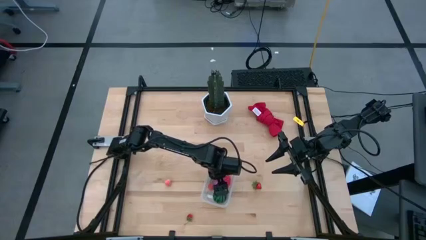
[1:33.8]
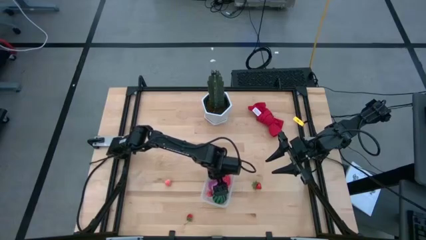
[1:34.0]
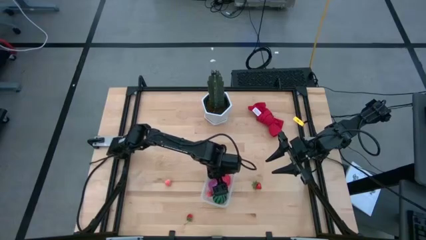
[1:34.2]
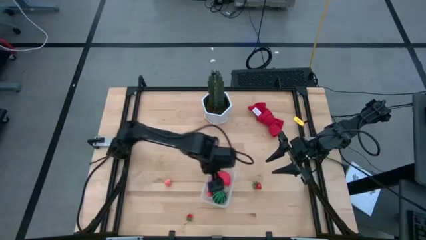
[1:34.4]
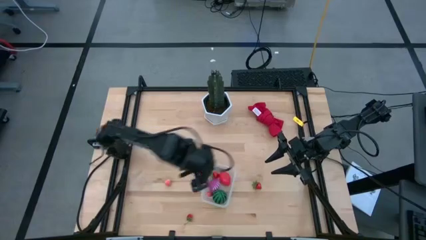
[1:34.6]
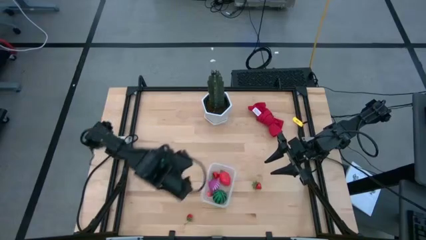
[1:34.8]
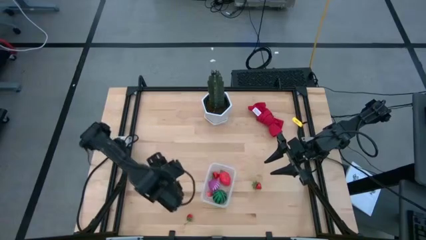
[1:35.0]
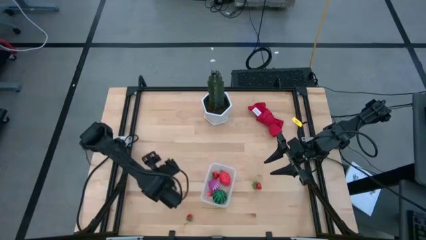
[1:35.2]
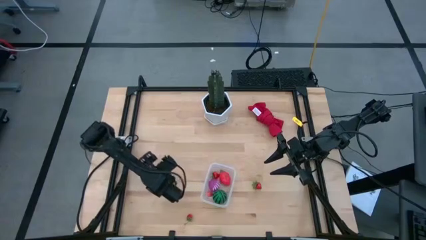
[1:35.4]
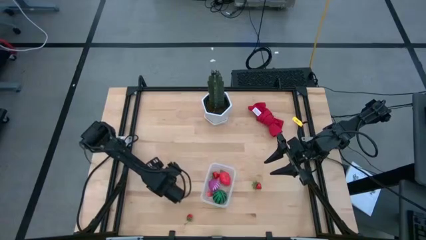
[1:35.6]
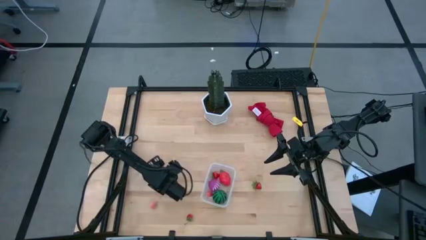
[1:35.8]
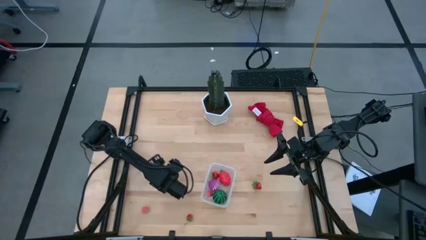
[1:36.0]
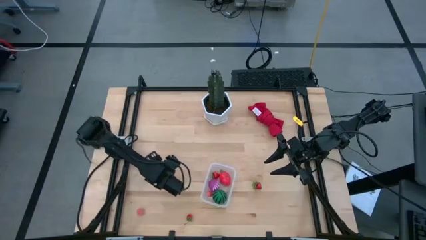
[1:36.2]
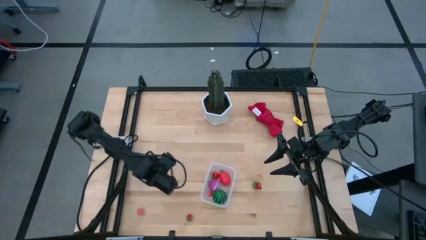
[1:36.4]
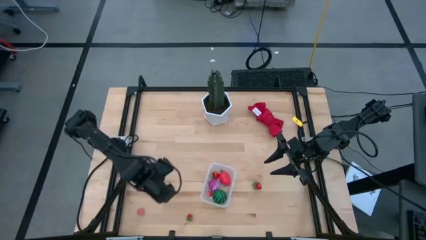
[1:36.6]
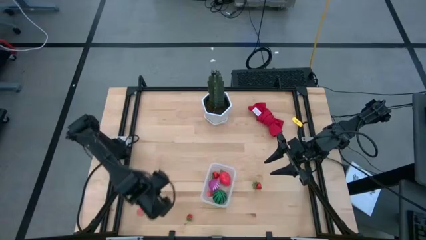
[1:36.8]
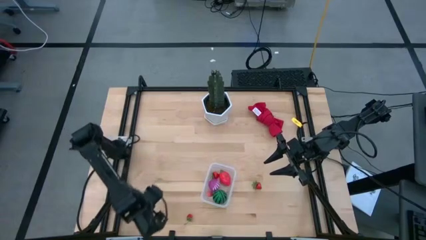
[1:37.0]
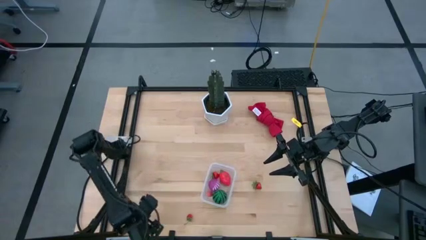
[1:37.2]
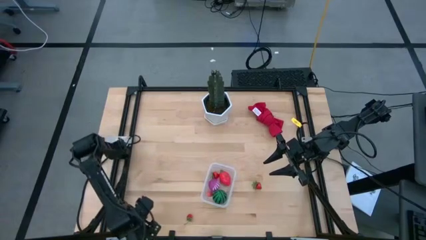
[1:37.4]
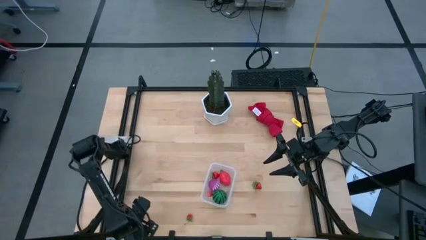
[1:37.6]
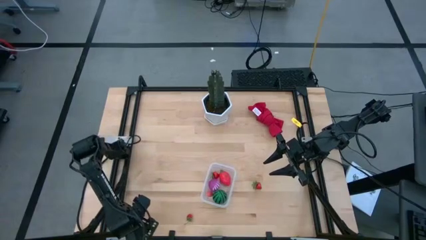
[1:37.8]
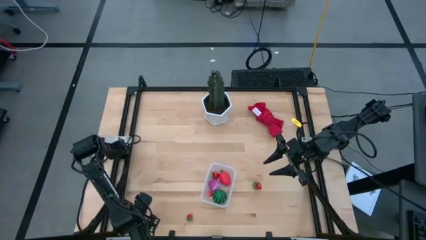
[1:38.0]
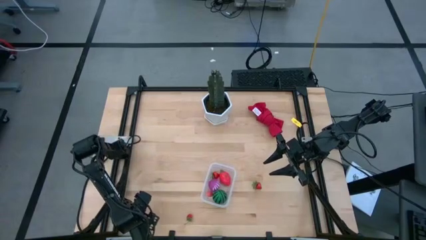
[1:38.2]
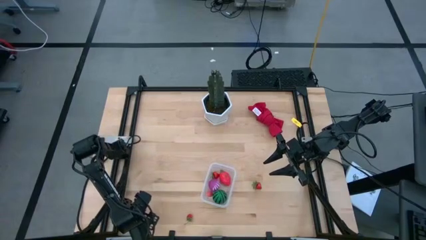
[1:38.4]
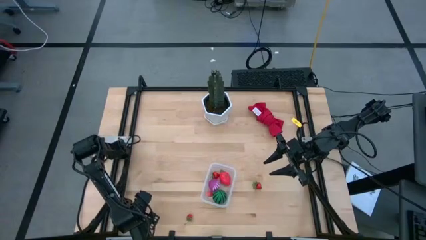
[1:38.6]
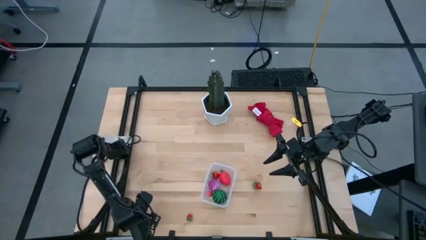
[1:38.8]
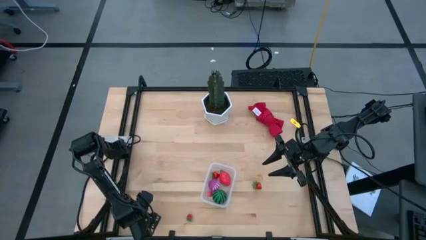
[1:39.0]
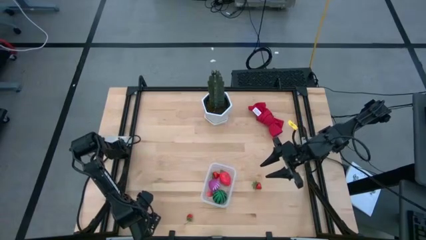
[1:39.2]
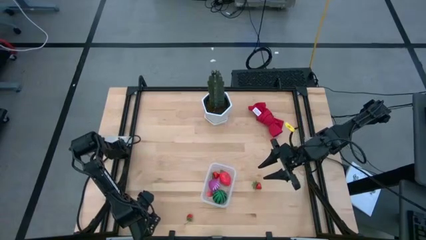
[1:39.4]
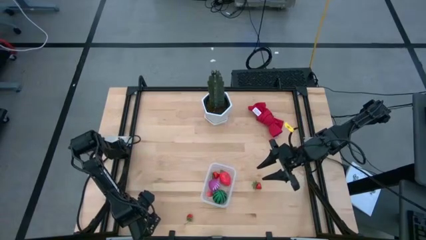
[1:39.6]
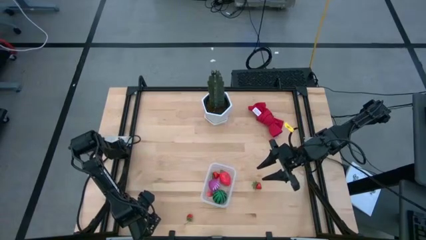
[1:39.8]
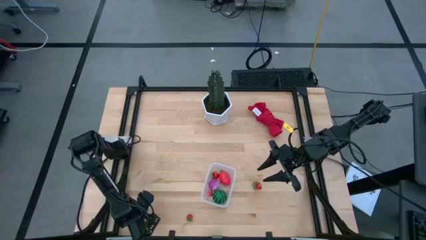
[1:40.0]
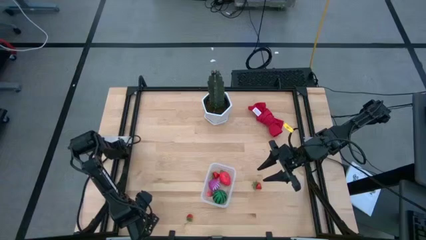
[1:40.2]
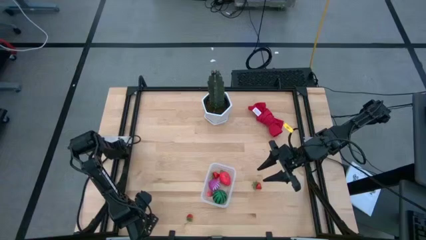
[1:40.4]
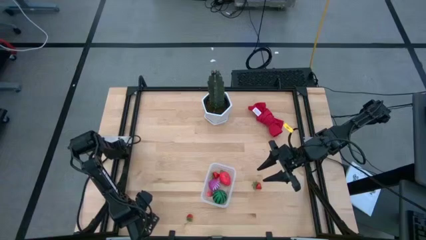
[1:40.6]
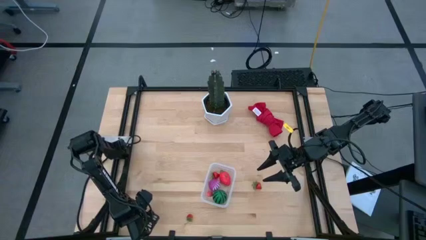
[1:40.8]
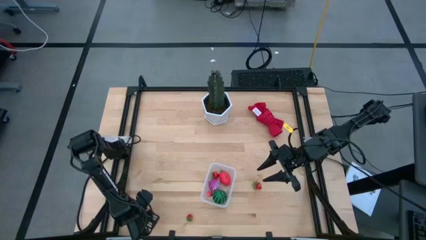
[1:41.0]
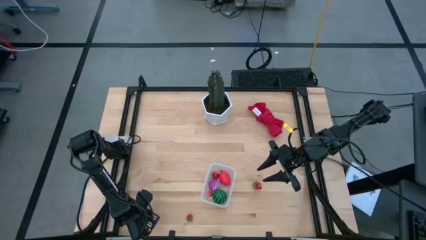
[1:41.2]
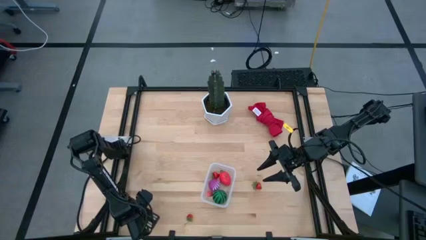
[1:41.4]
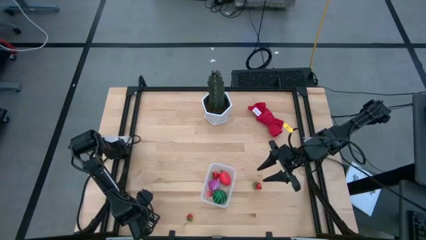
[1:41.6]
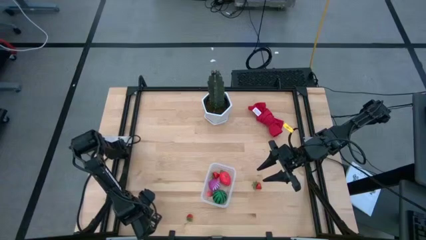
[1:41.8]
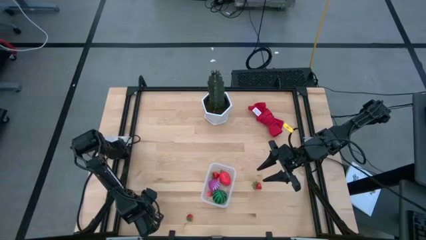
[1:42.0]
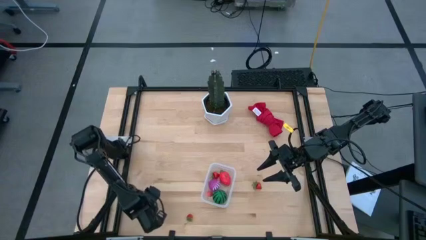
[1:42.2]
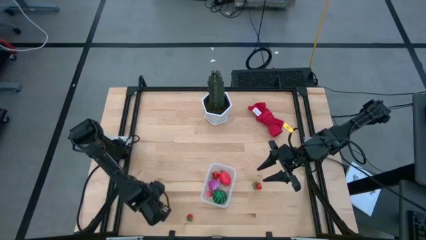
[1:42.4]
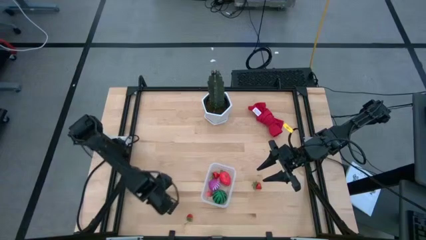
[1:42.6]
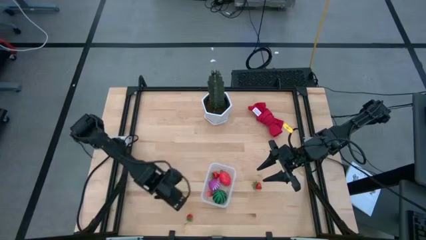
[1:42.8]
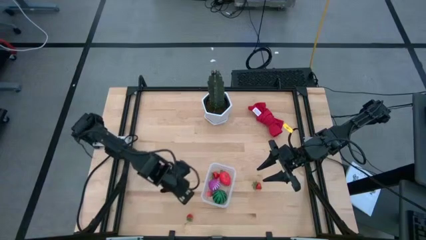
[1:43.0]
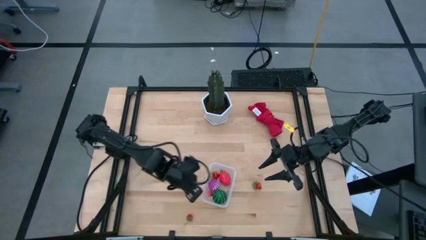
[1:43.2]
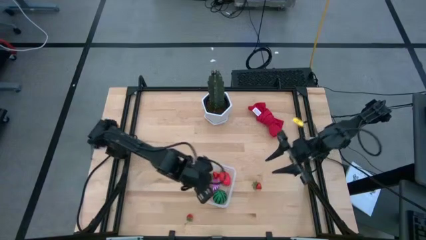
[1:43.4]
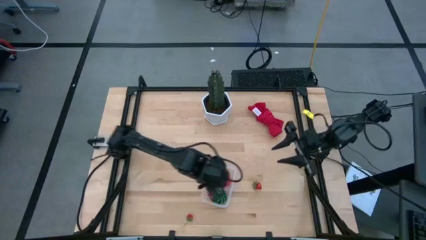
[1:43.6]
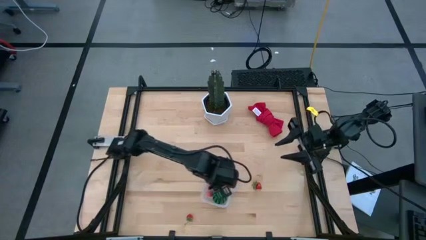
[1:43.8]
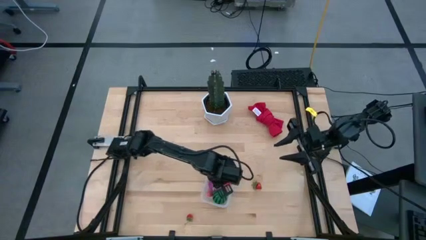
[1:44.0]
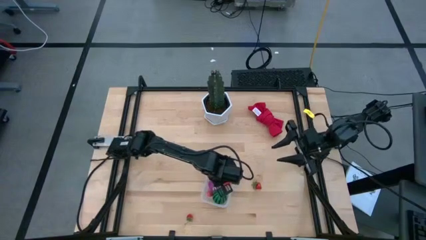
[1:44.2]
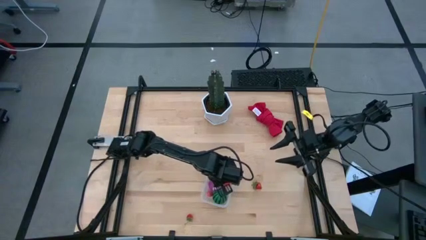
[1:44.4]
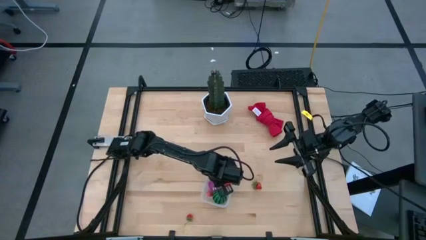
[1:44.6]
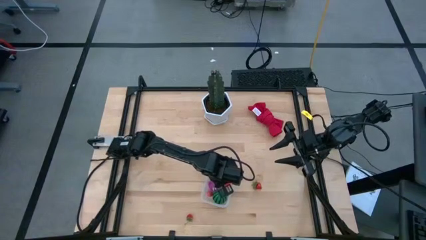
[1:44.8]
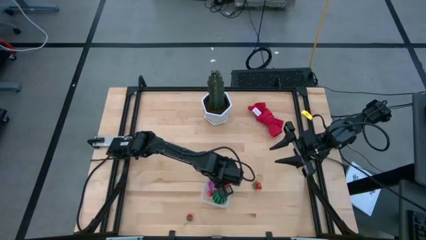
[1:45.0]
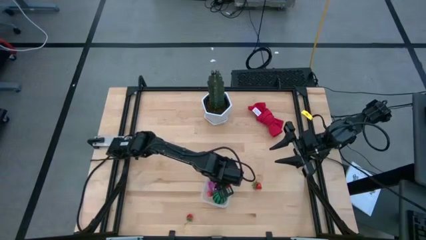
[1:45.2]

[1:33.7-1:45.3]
Task: Pick and placing Produce into tupperware
Put the pink peach into the transparent bin

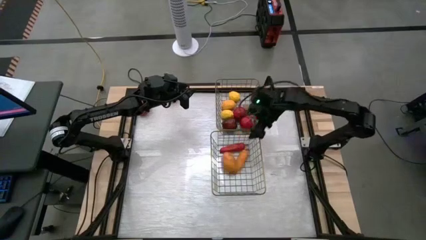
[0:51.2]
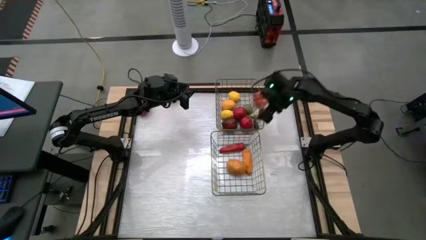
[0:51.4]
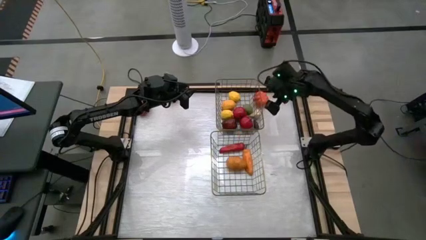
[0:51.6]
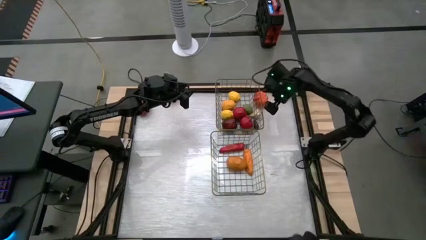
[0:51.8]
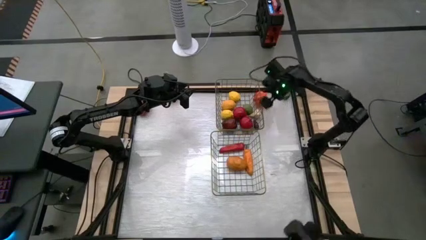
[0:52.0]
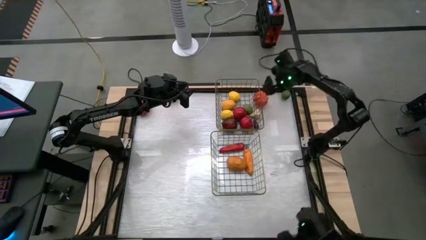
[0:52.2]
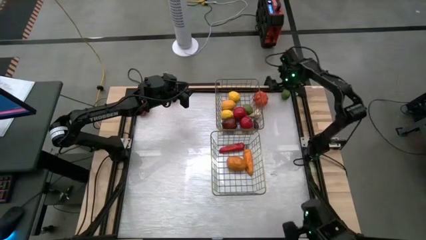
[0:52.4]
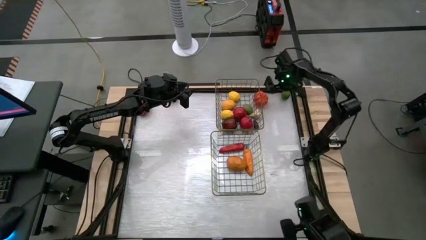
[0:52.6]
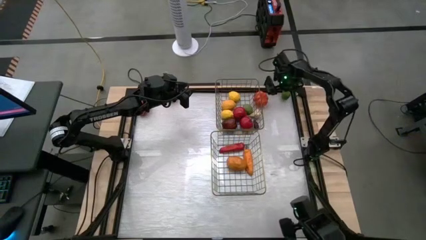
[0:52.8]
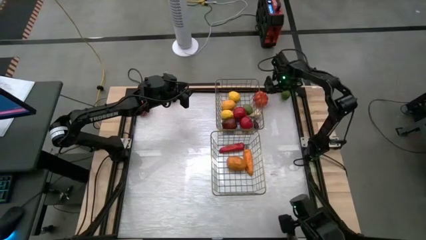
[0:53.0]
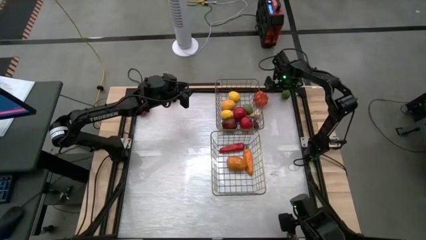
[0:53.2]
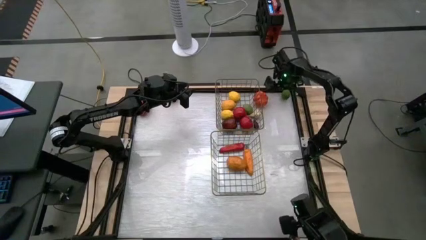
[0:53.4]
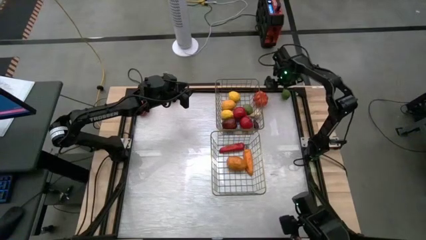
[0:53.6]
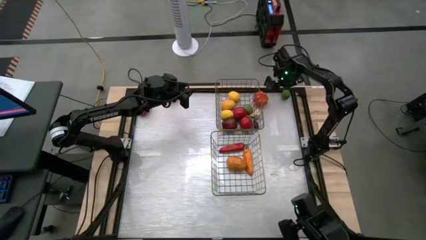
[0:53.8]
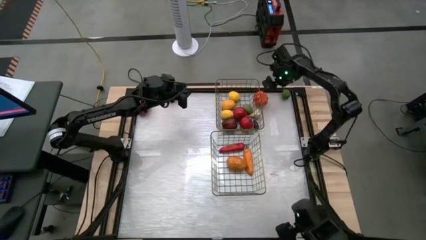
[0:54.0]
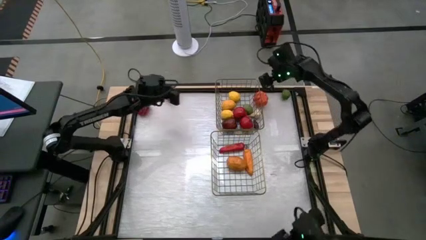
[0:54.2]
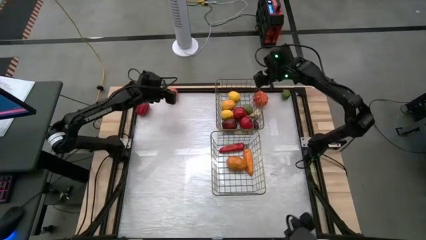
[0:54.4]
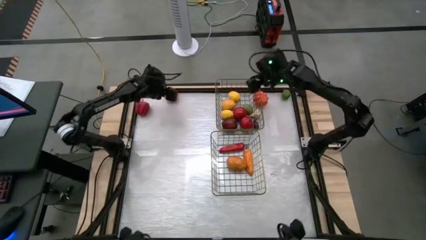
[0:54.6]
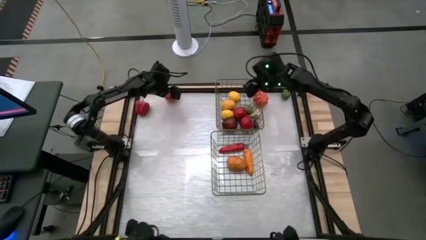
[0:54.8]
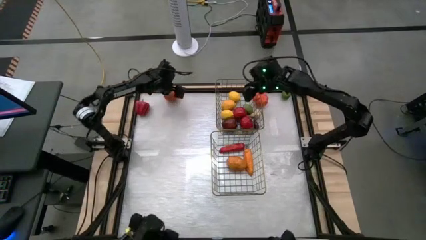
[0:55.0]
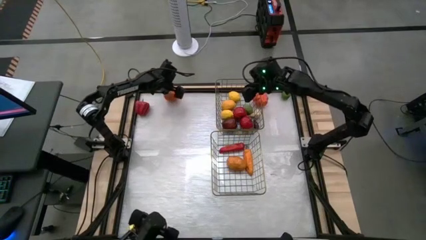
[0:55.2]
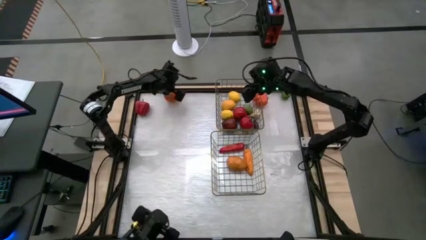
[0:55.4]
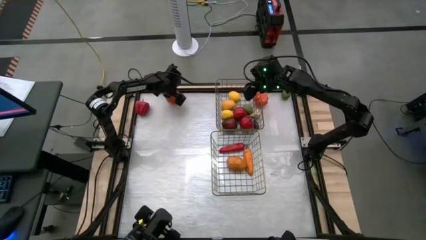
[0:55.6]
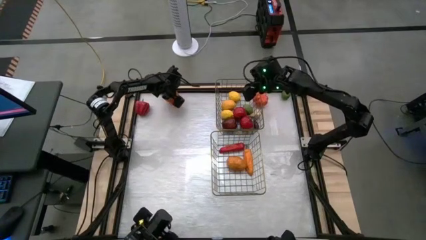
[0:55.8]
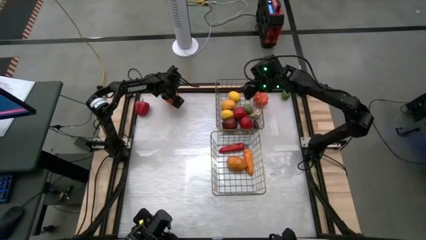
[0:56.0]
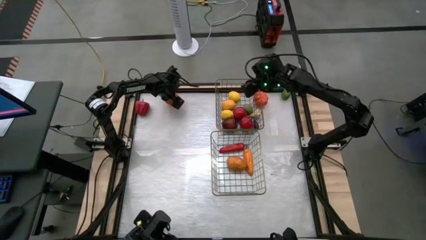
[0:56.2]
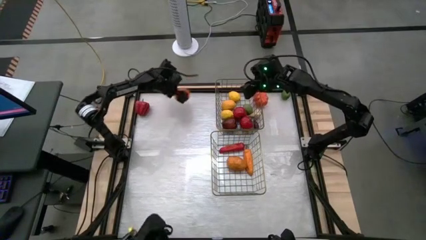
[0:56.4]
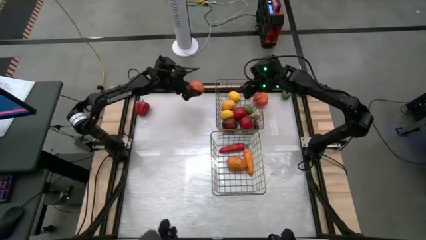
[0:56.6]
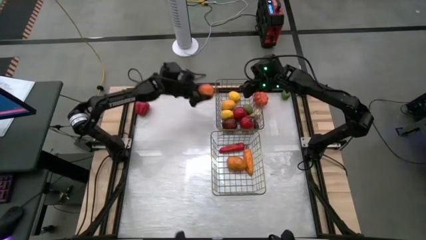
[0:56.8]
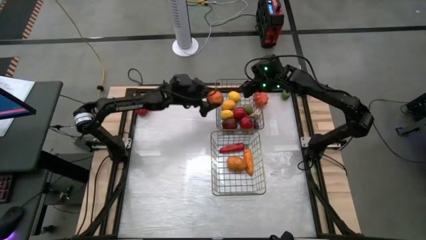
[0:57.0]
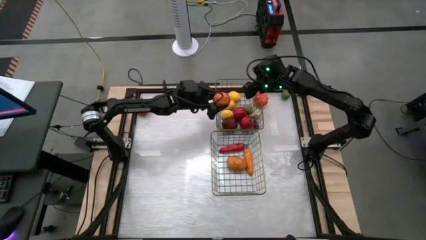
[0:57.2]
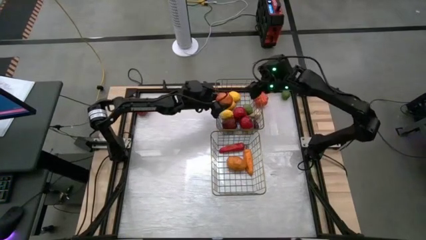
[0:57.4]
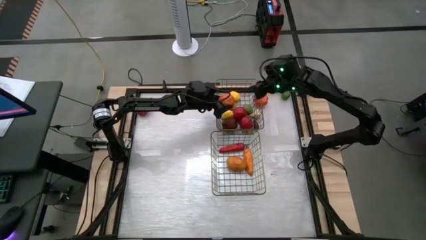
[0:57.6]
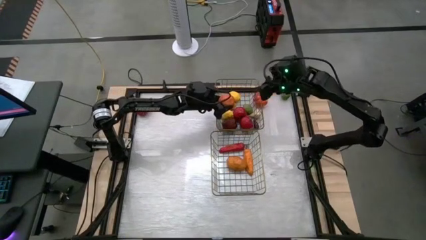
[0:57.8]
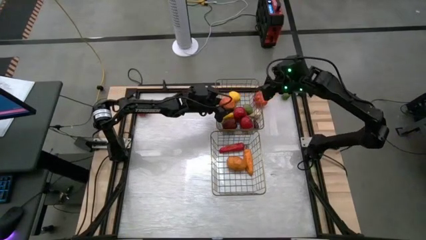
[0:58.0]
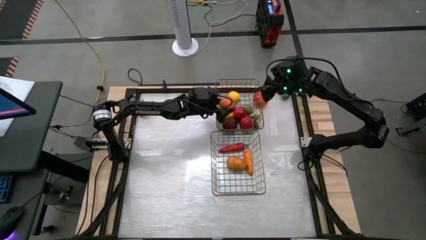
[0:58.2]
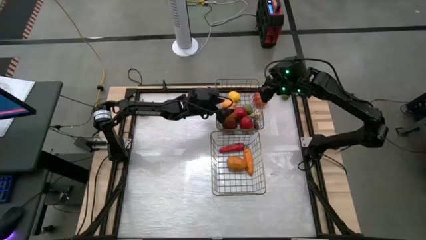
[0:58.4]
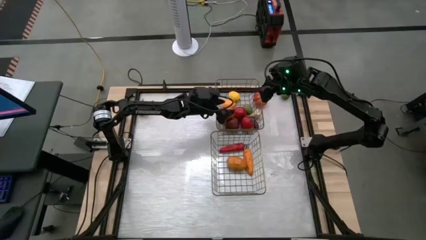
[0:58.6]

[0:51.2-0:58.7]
Task: Sort produce into baskets
Put the orange fruit into the top wire basket
